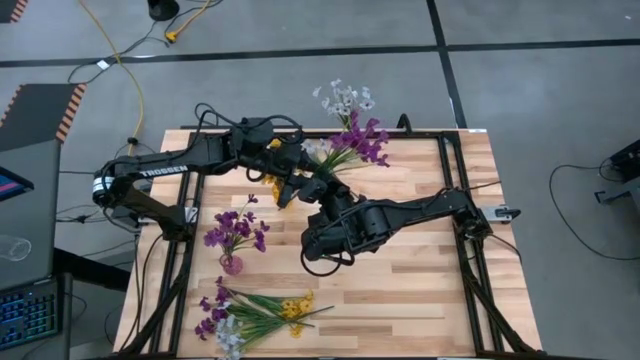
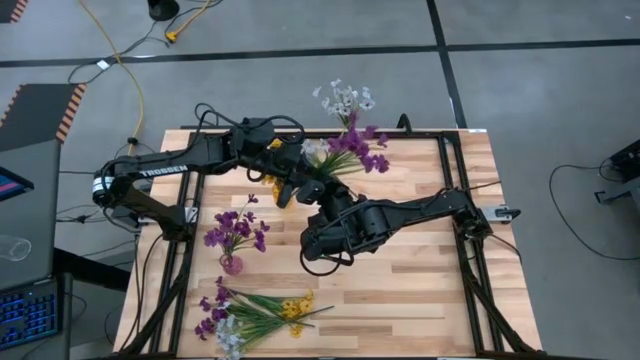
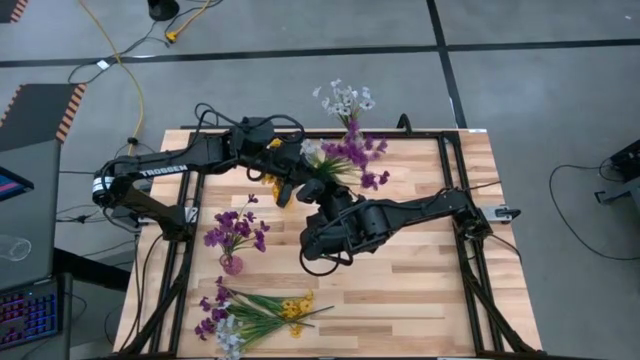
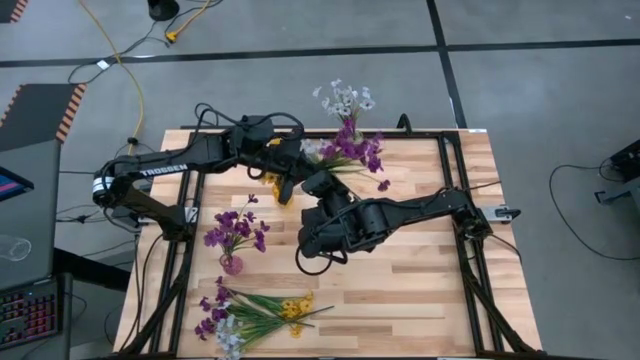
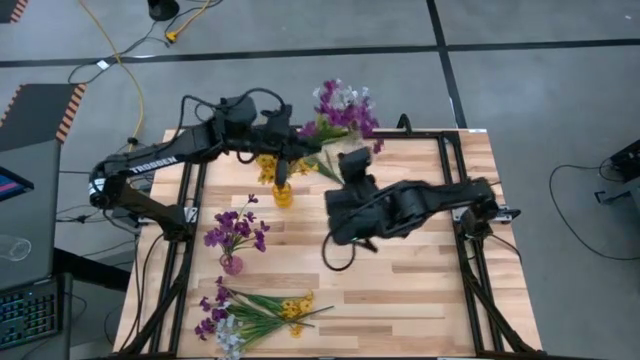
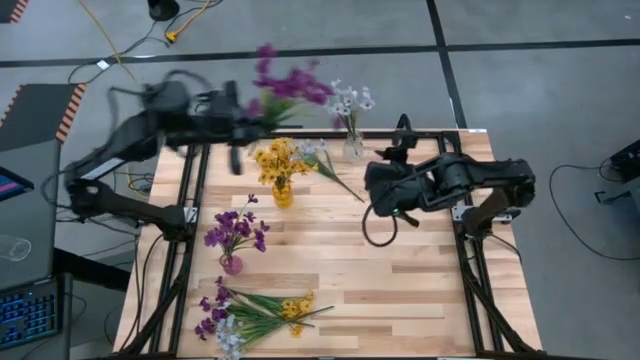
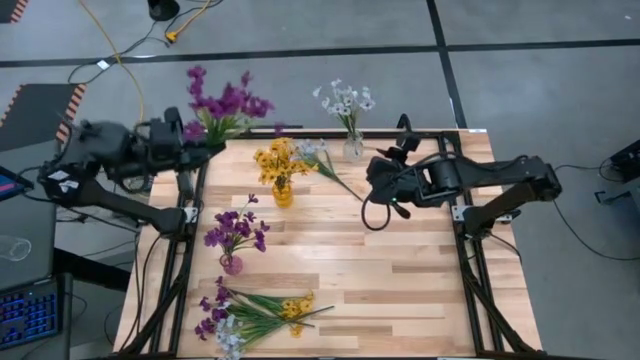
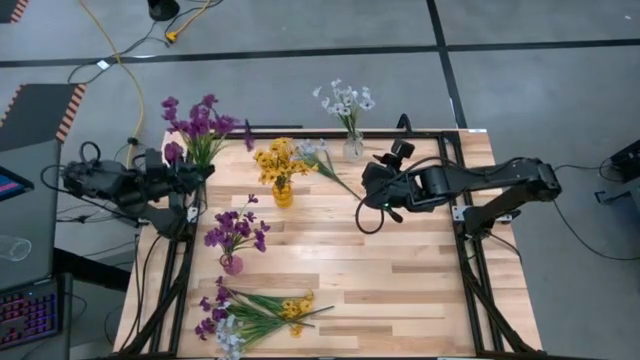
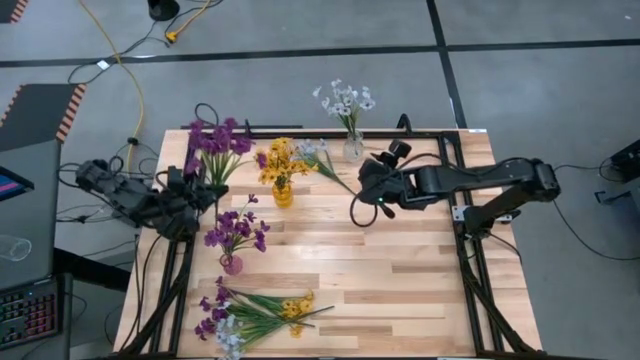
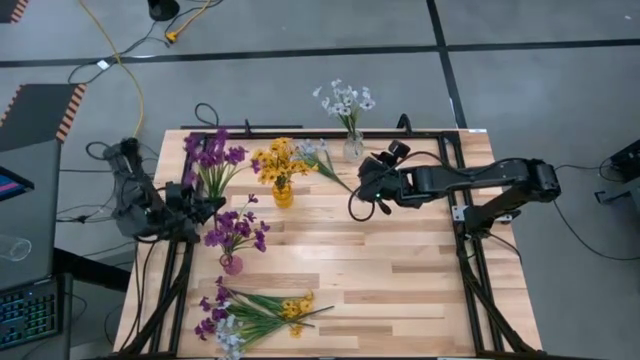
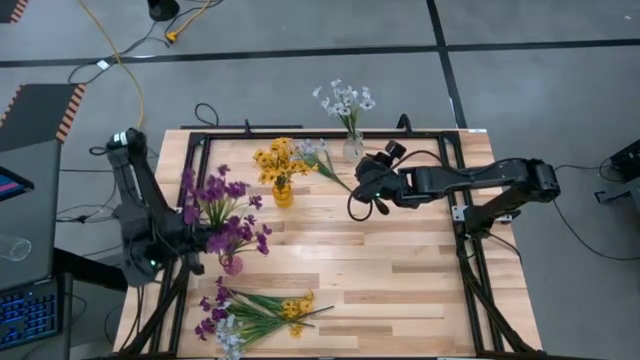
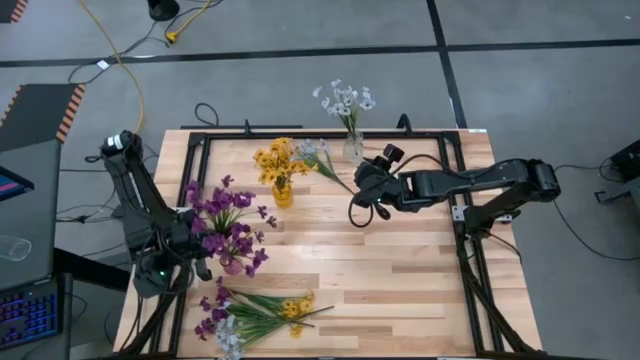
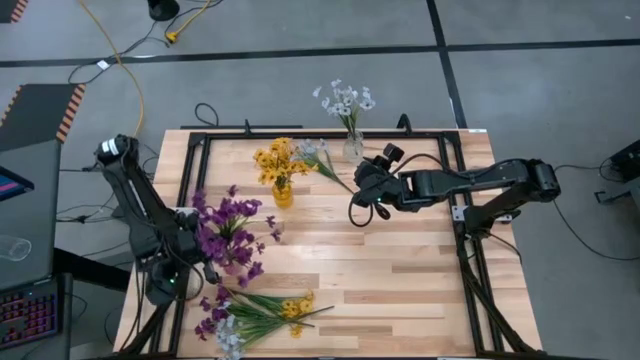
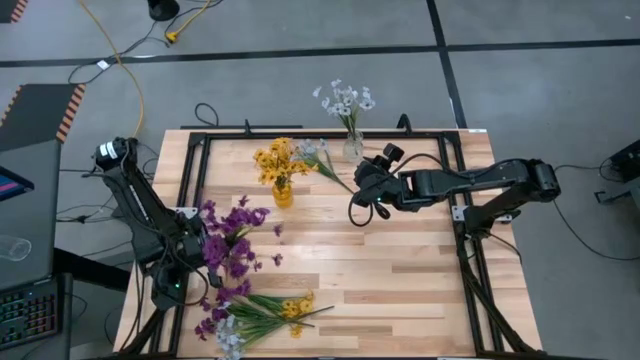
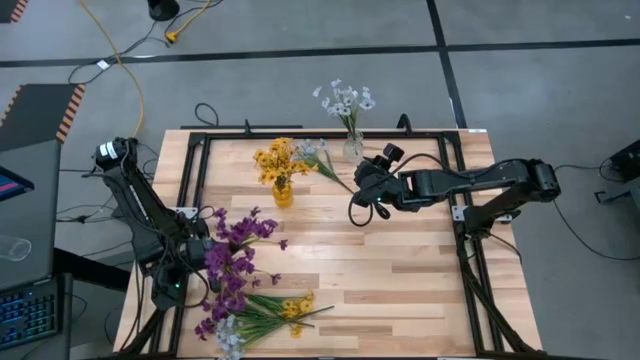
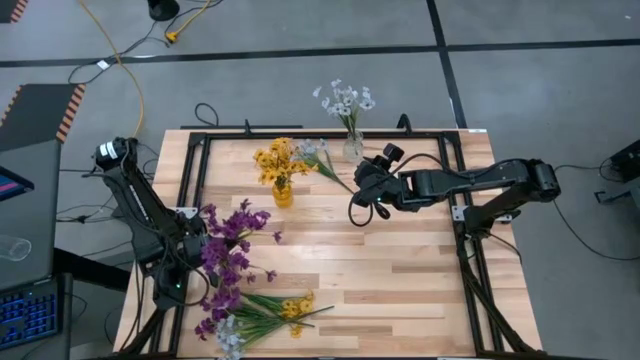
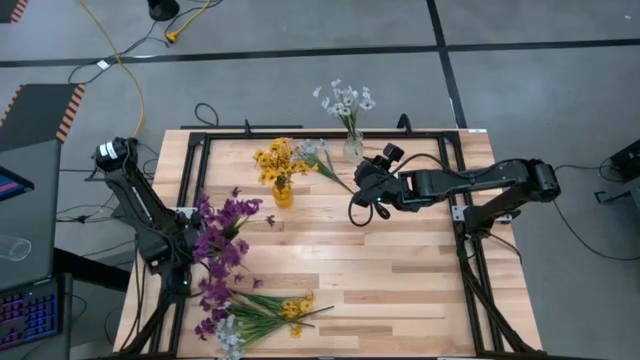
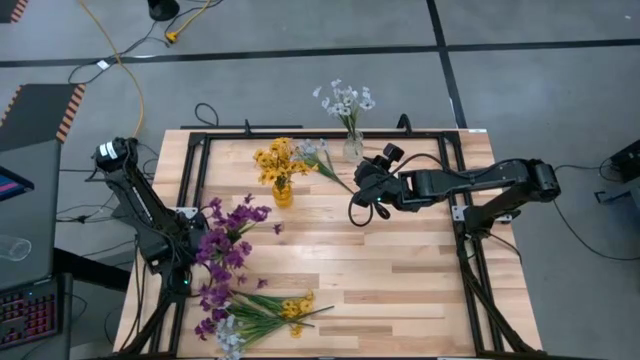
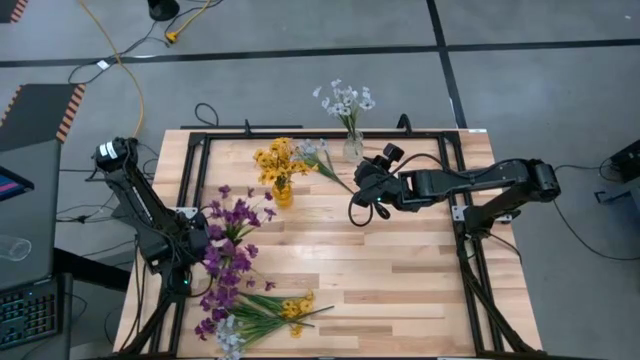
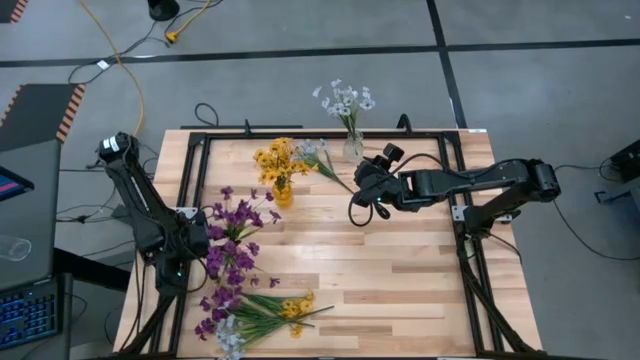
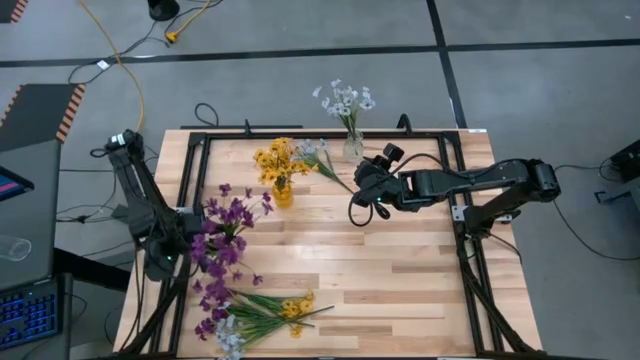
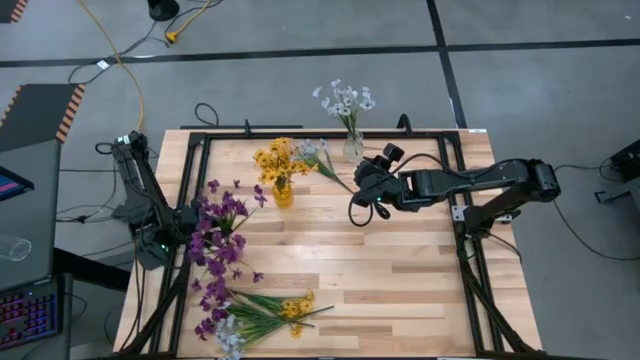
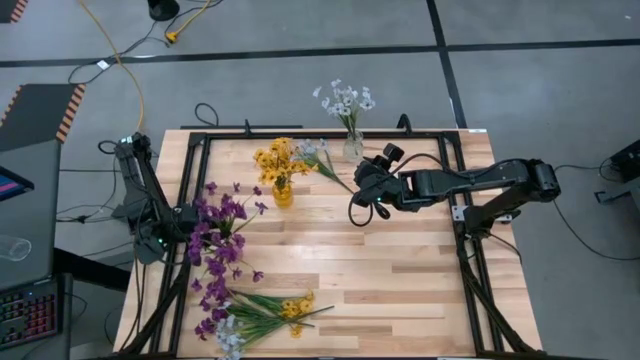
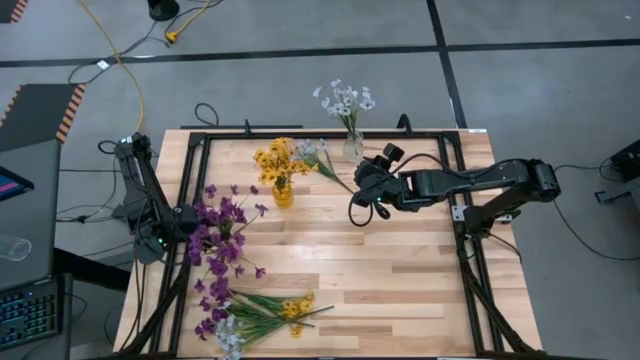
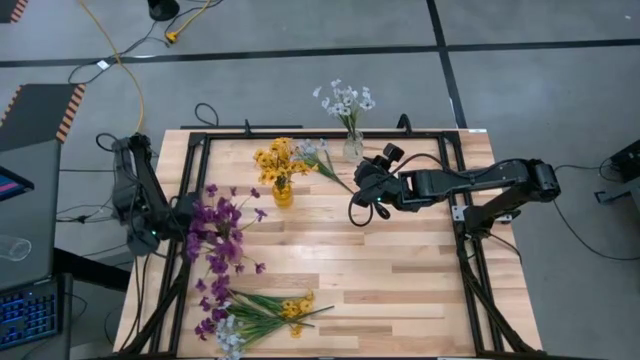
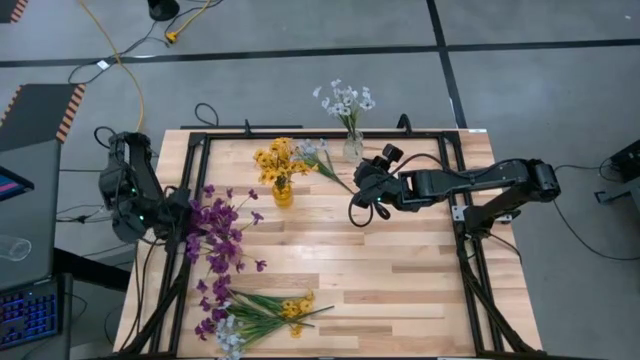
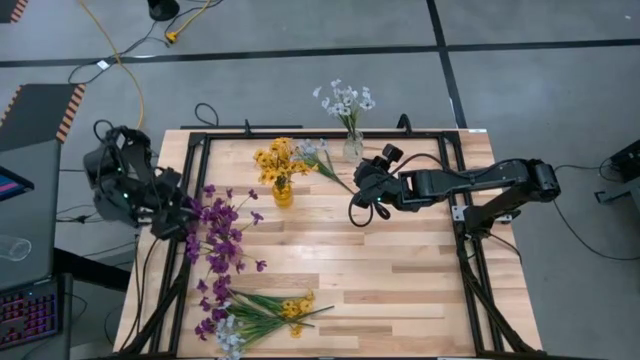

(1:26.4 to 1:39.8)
Task: Sort flowers into vase by color
Put the top violet flowers into the violet vase

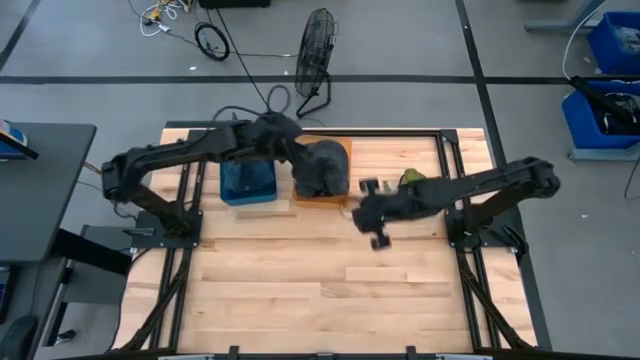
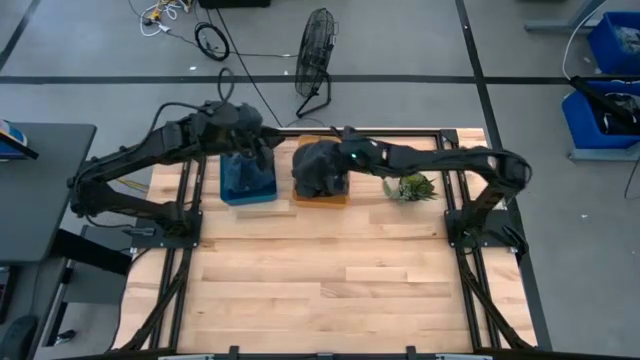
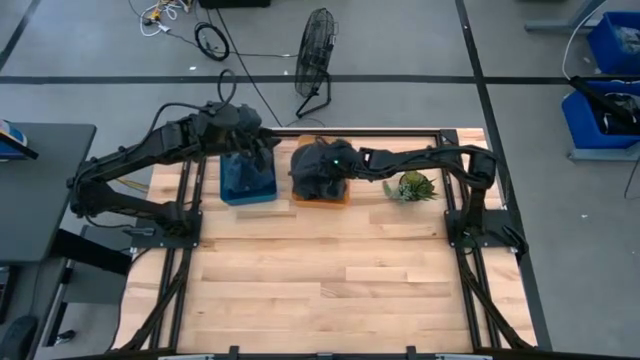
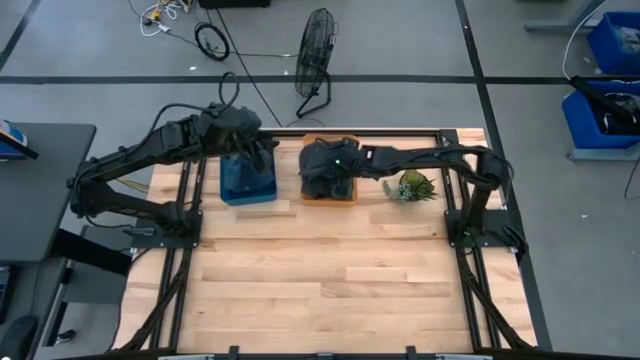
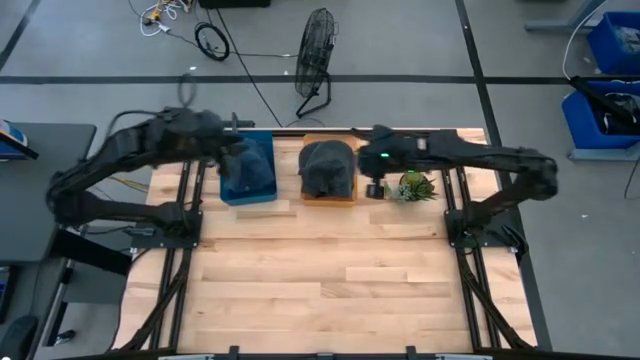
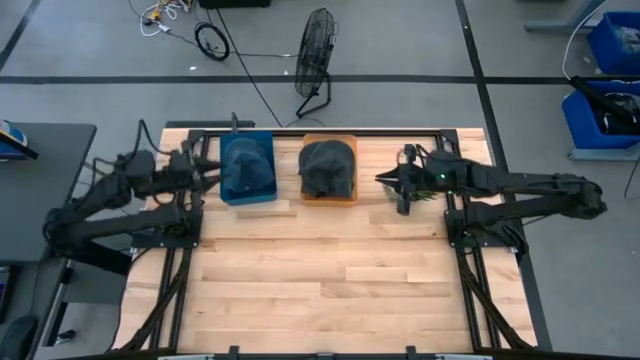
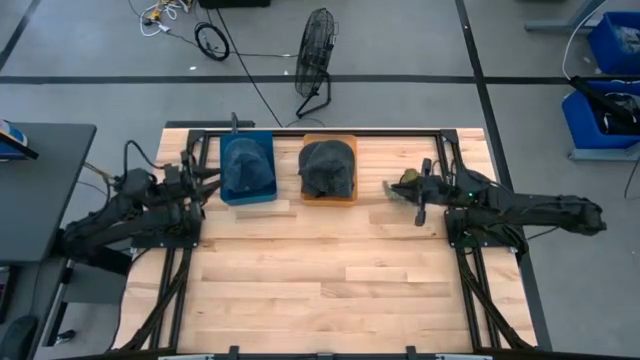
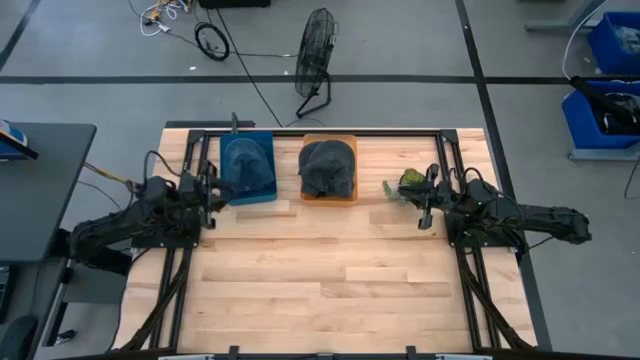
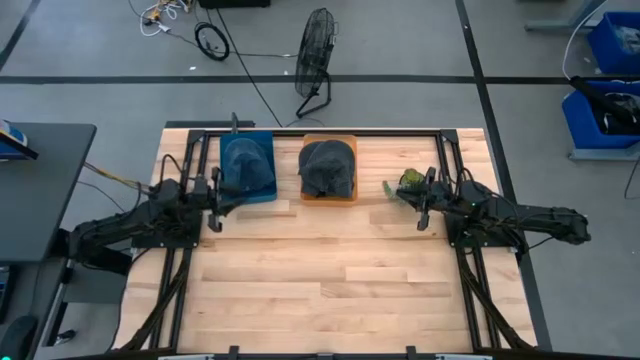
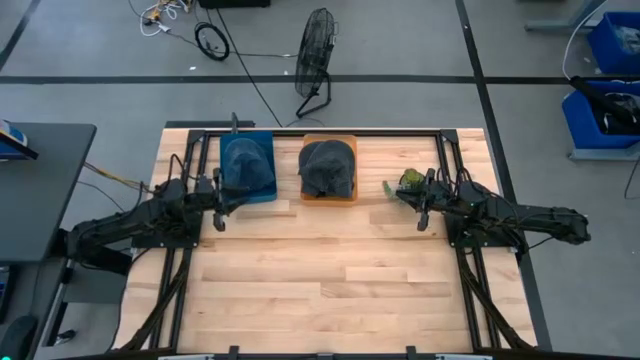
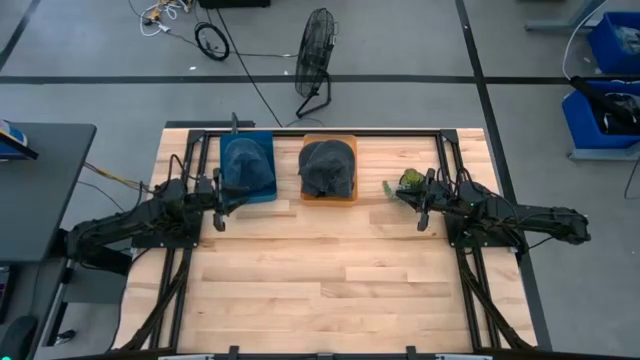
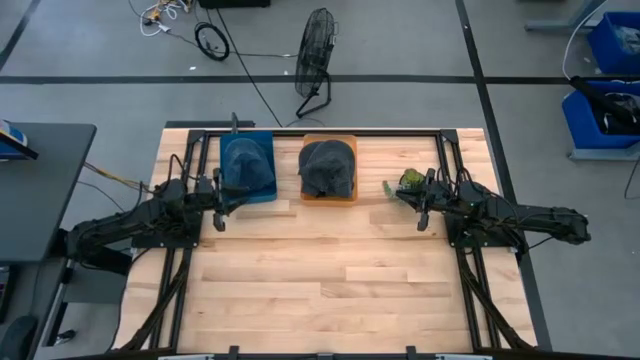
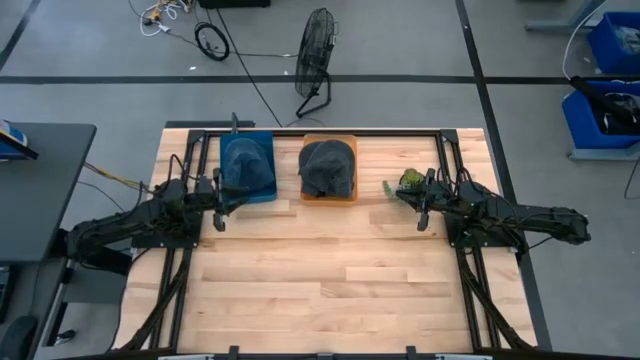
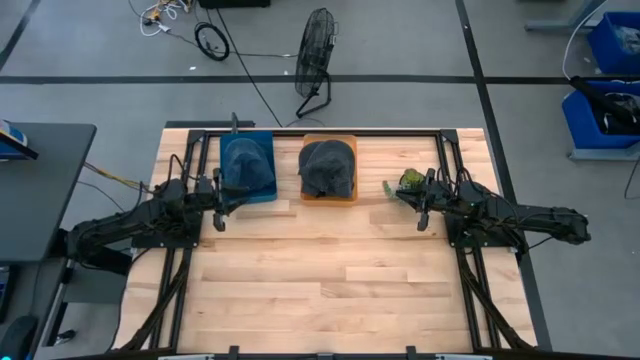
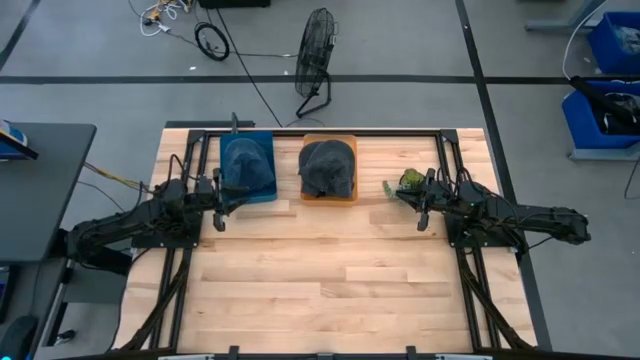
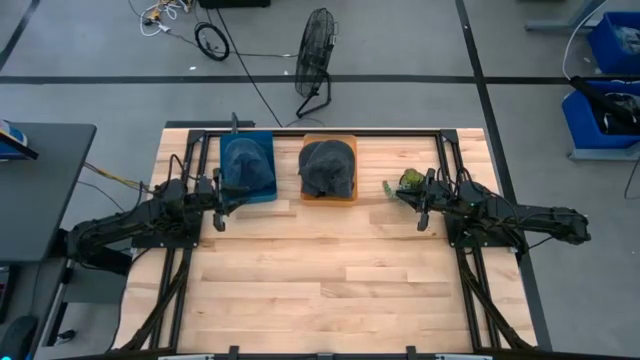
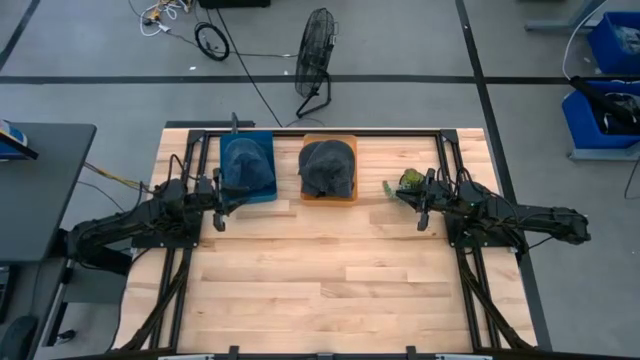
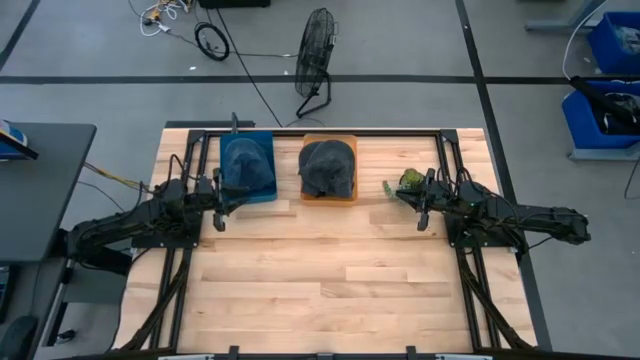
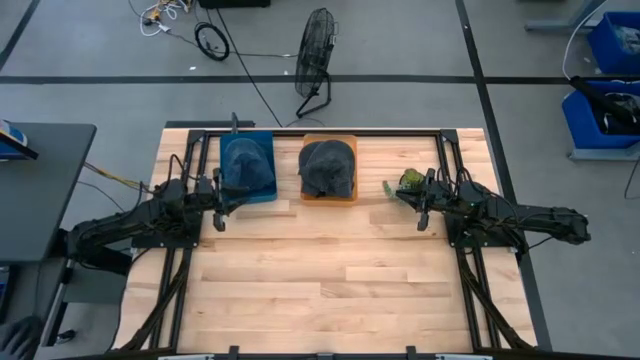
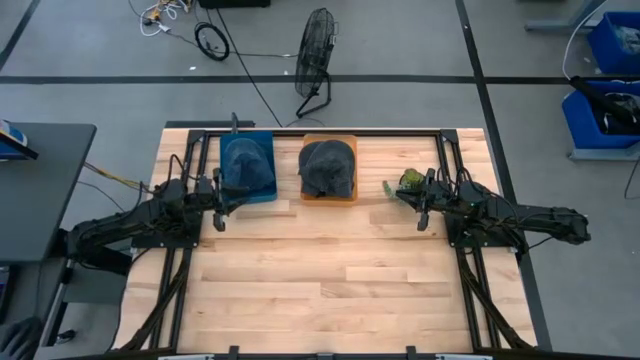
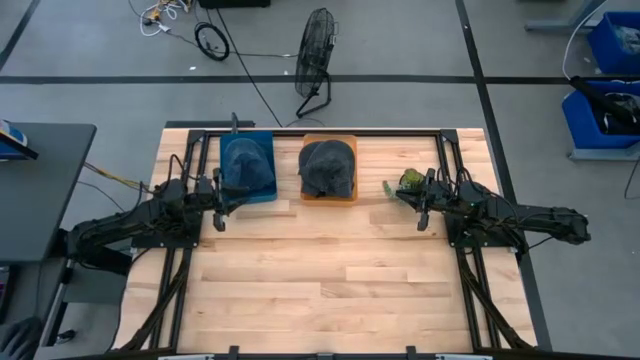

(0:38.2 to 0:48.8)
Task: Pick & Place hat
Return to home position
